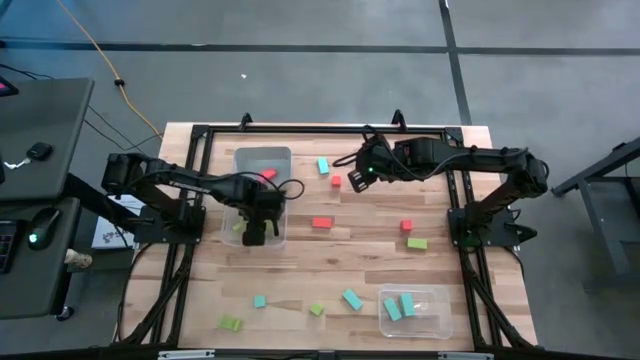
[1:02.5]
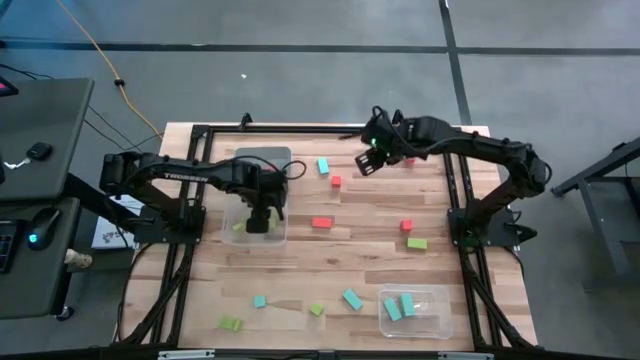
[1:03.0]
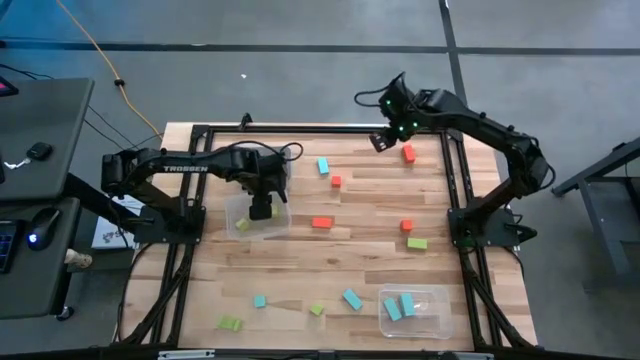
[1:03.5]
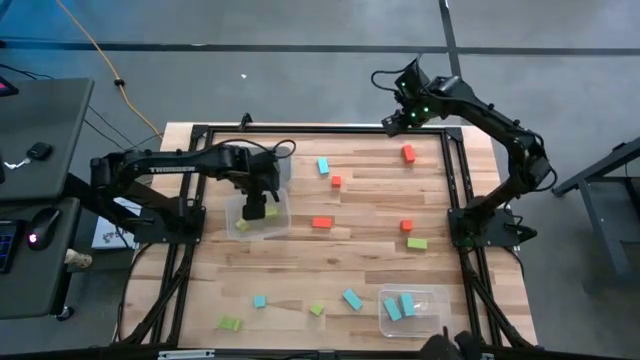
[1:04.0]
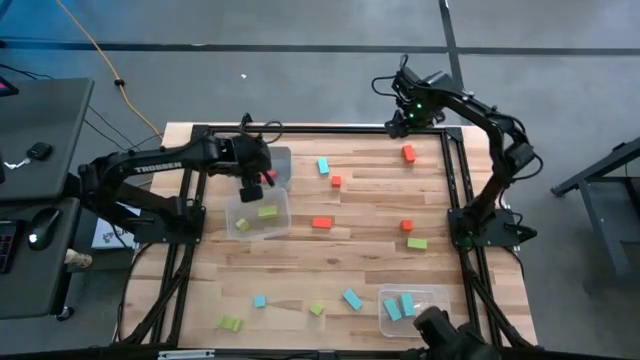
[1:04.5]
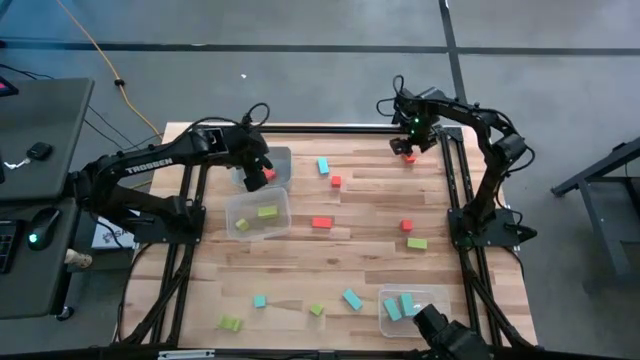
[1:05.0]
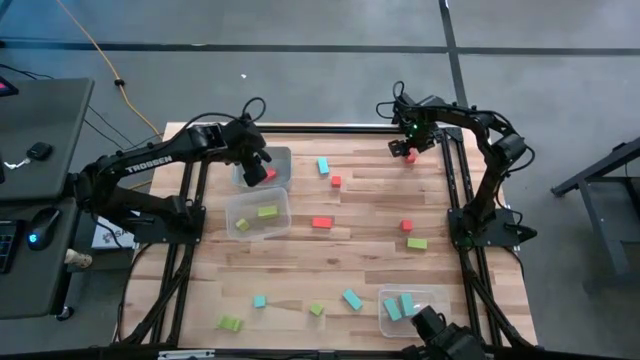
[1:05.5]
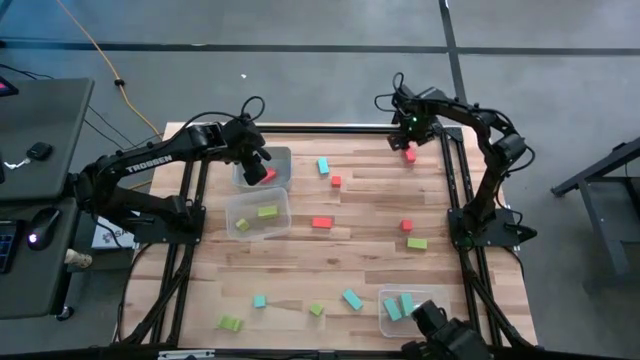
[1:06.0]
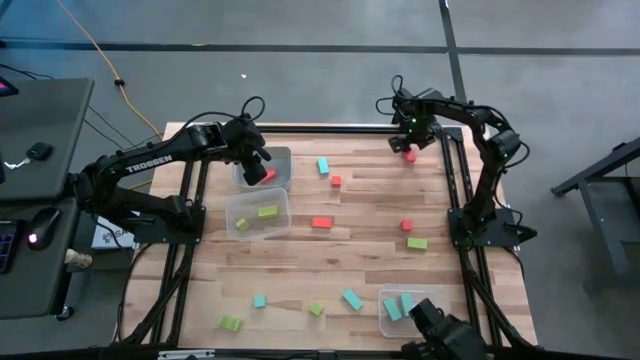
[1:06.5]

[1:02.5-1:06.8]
Task: Sort & place blocks by color
Put the orange block into the gray bin

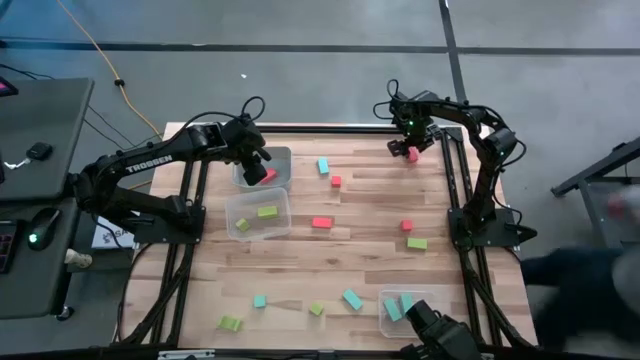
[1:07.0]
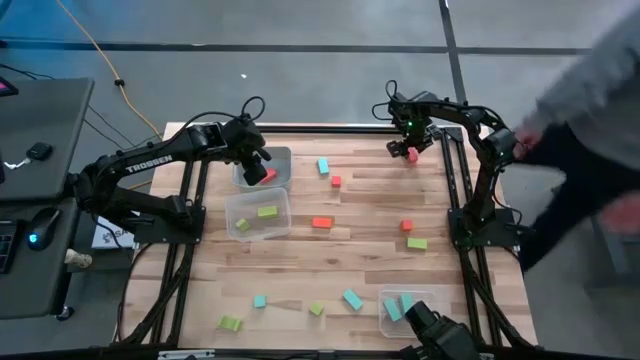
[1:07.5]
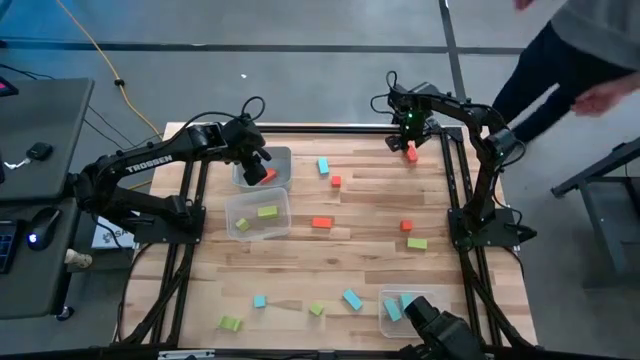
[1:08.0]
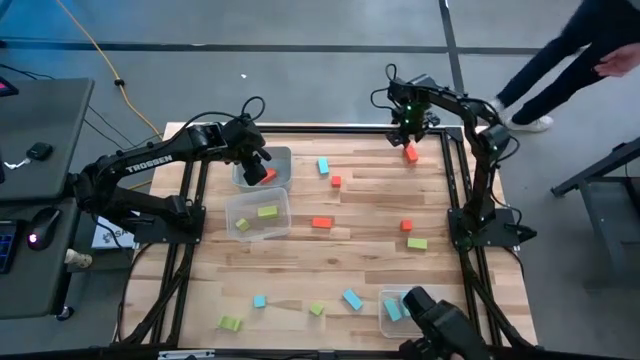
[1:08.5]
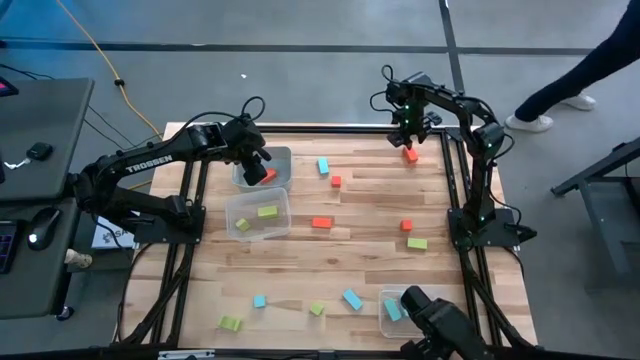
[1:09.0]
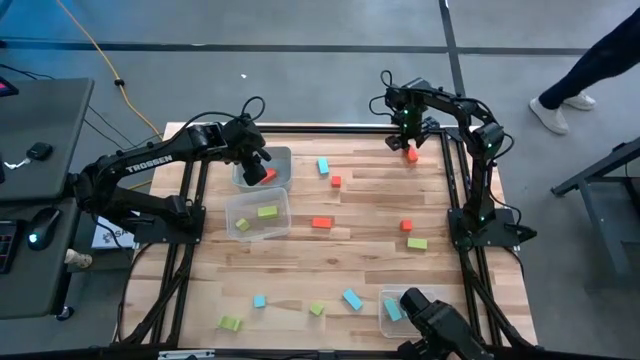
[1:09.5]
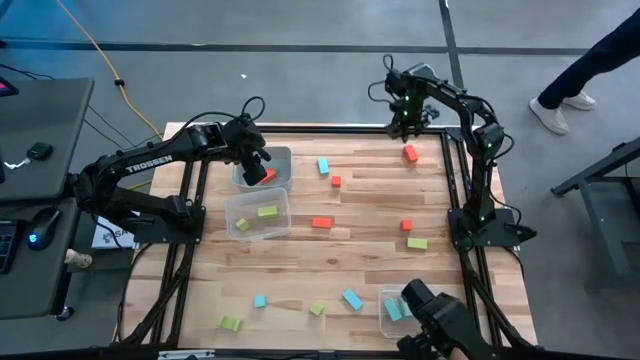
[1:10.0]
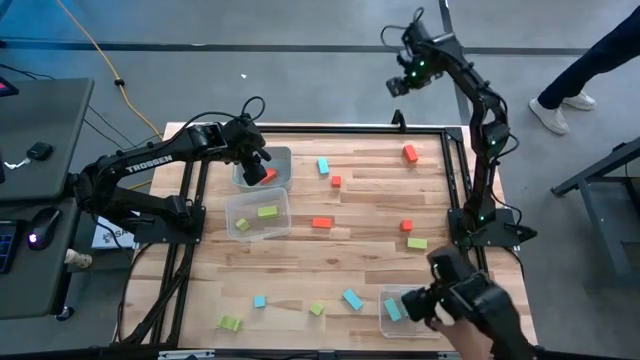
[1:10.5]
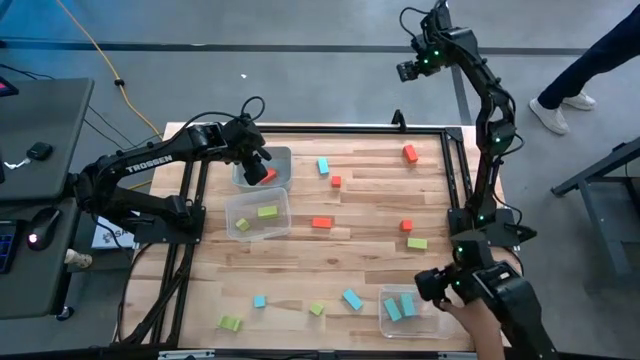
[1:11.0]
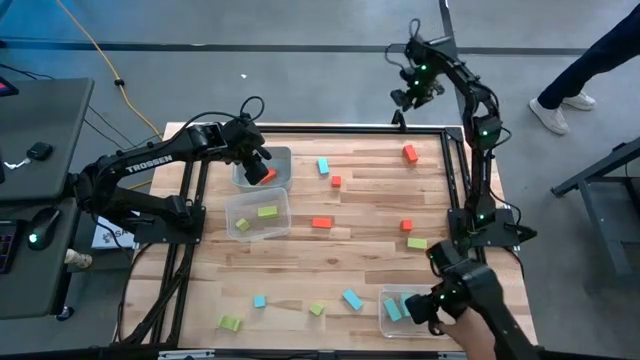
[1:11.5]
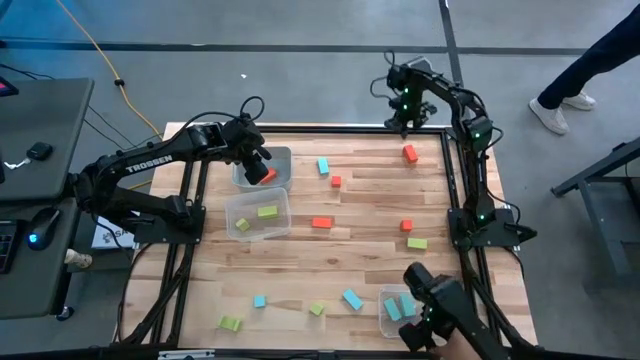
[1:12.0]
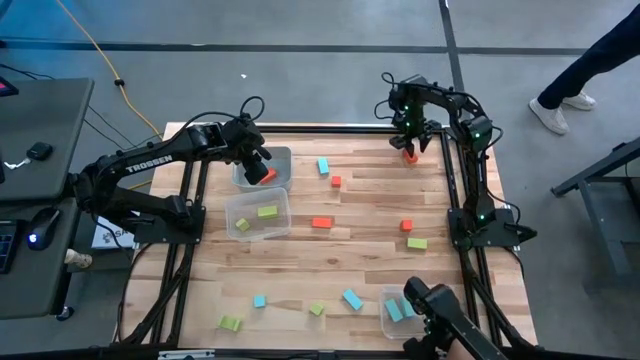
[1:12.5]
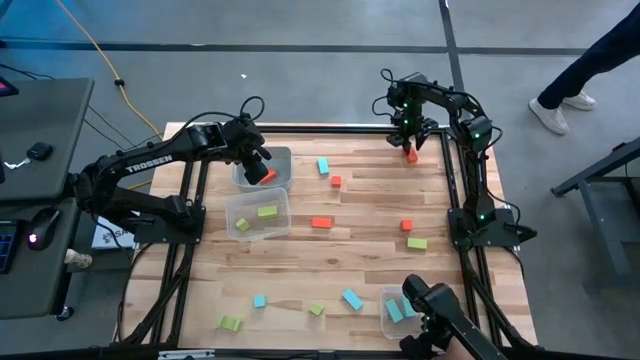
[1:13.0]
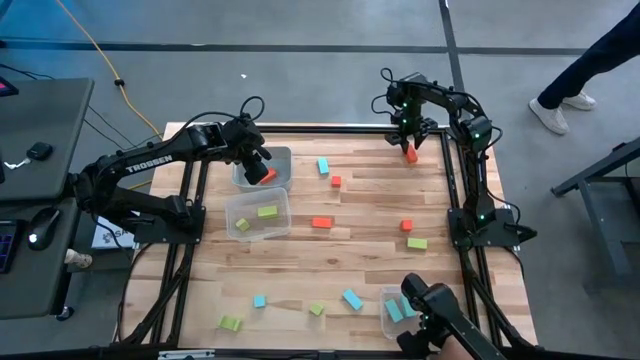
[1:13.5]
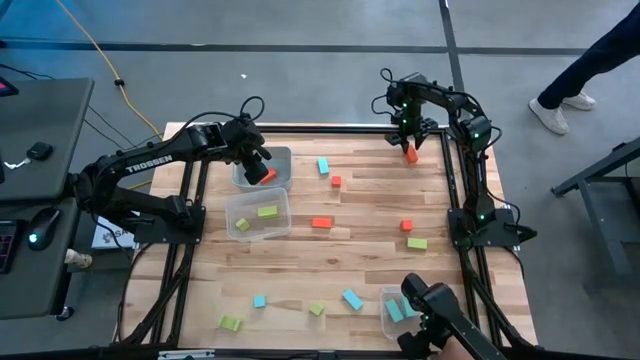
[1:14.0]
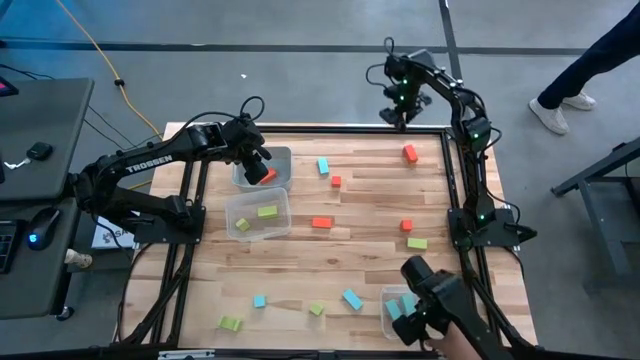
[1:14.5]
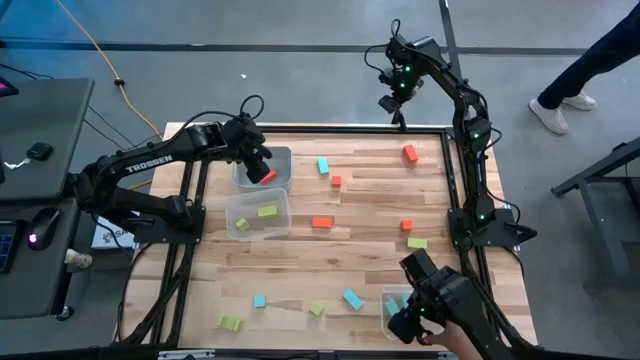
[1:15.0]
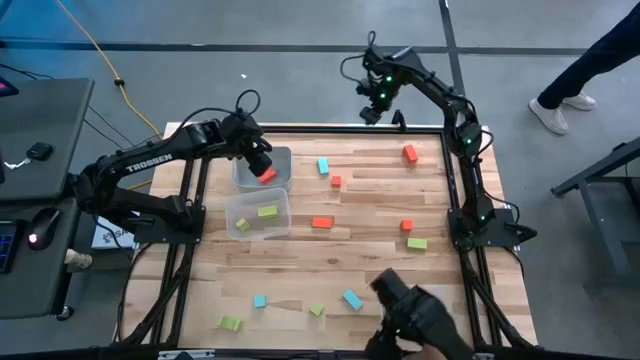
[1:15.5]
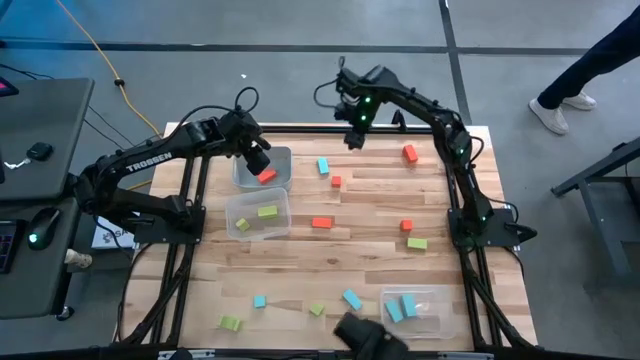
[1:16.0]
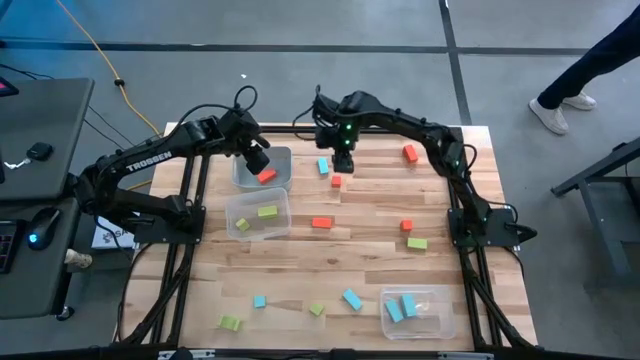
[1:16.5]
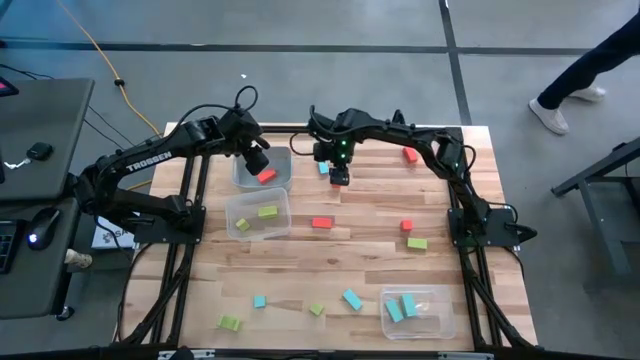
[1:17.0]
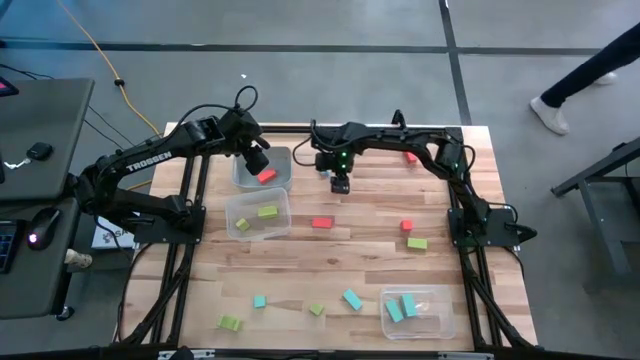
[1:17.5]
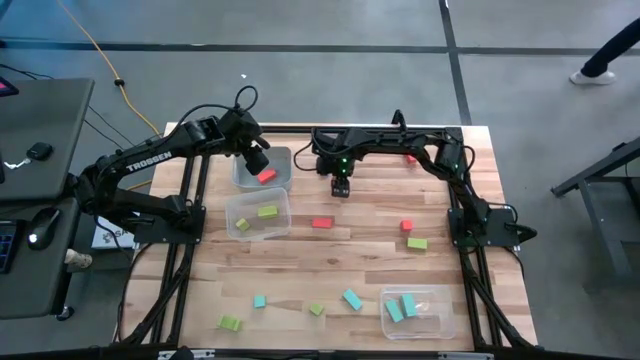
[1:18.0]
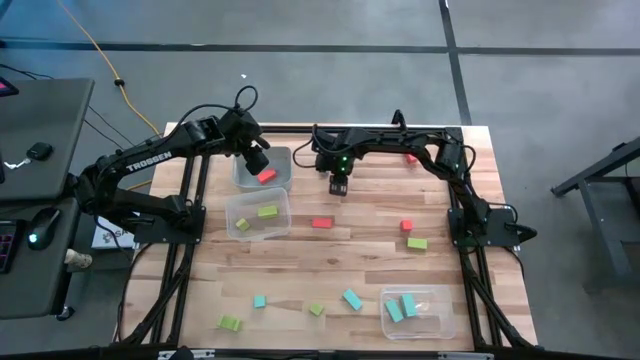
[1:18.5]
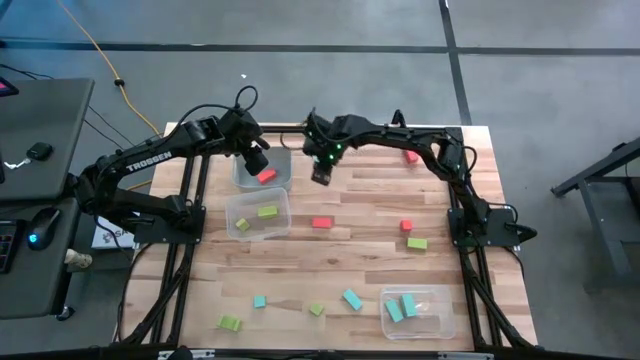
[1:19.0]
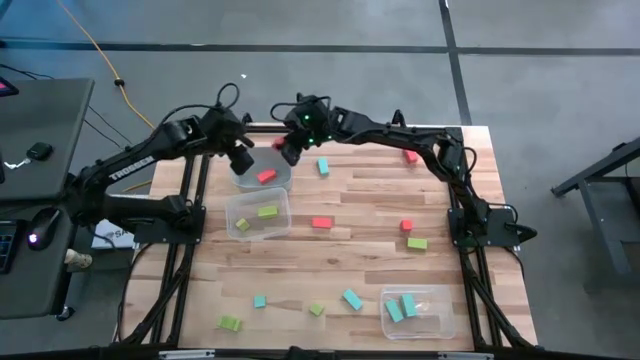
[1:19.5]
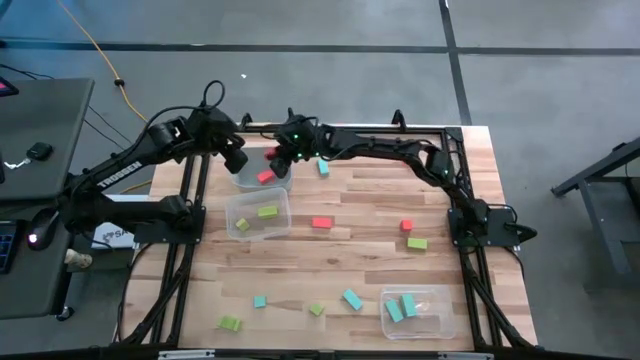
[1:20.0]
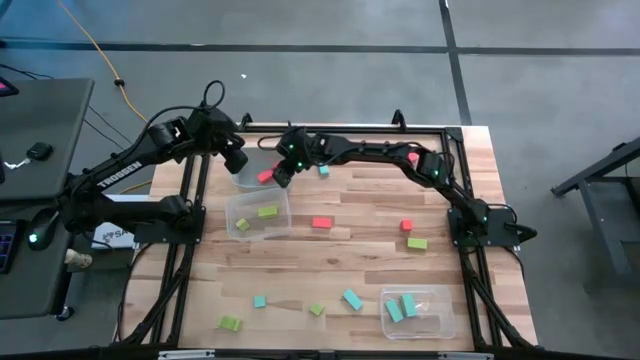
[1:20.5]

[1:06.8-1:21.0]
Put the orange block into the gray bin

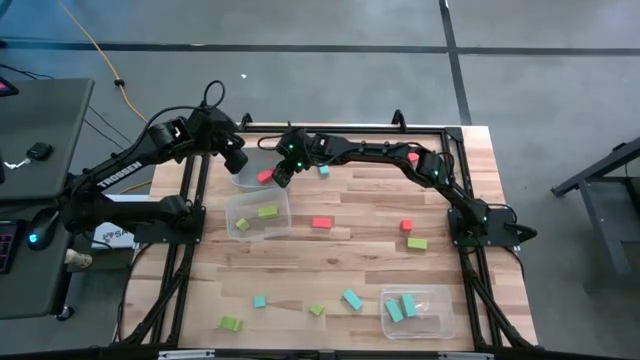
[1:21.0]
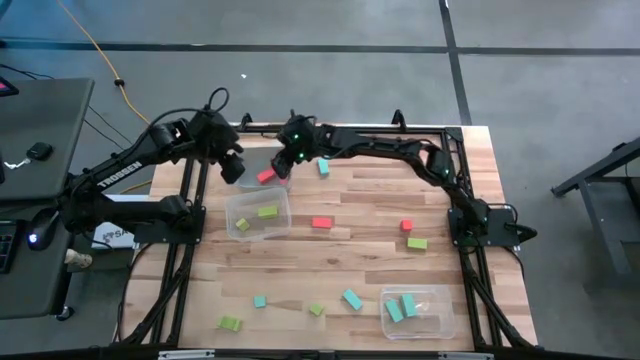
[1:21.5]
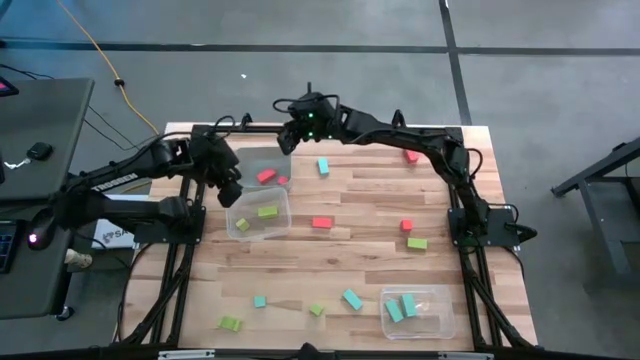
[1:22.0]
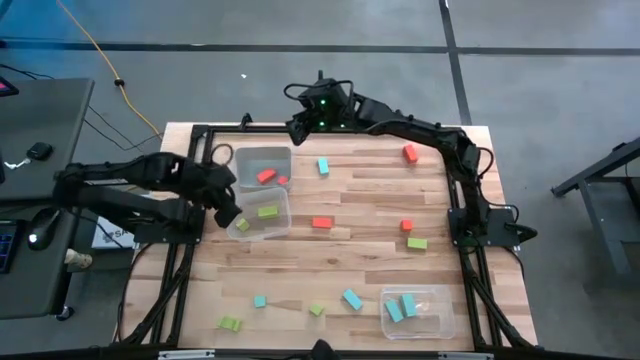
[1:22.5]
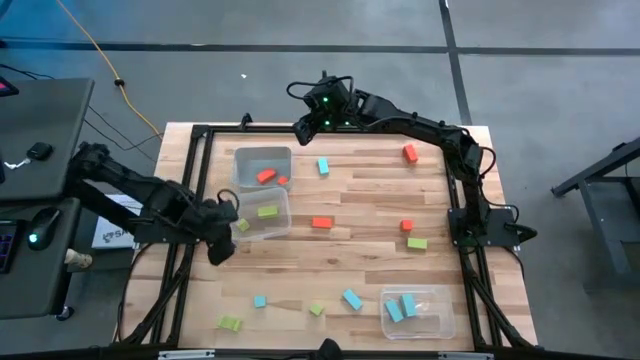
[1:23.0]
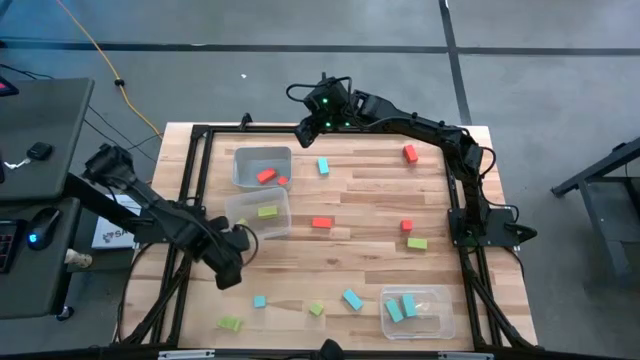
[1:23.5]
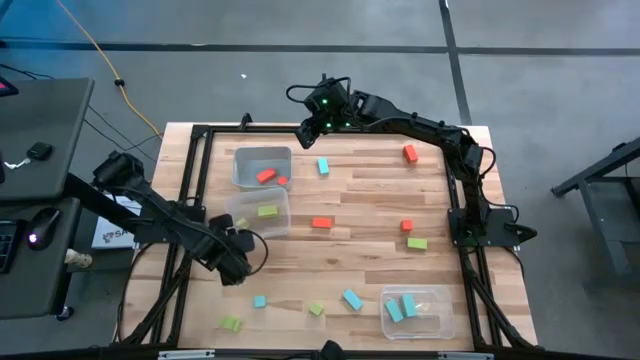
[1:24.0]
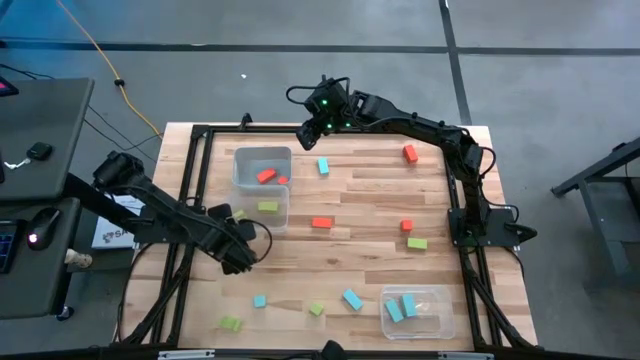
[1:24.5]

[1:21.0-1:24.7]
Adjust the top transparent bin
